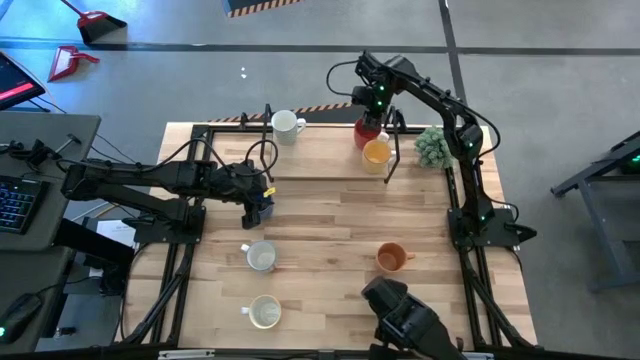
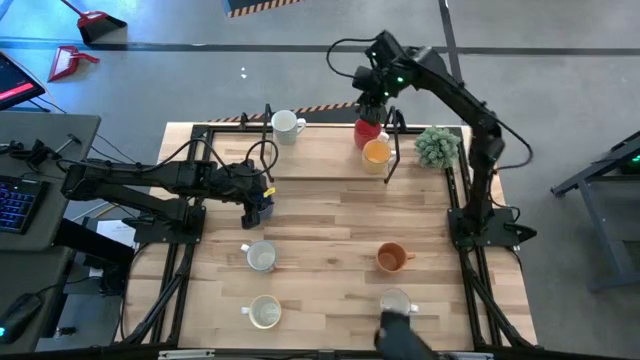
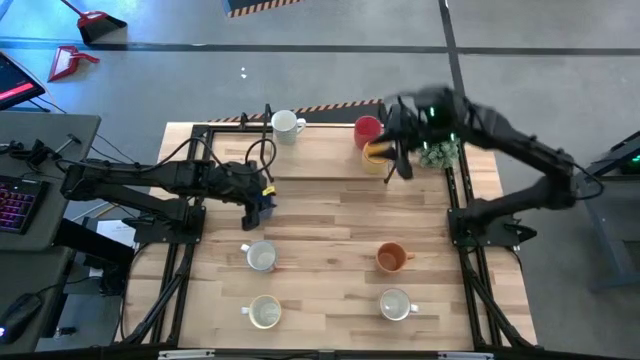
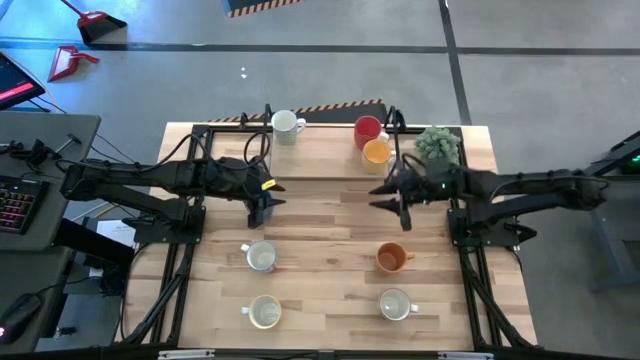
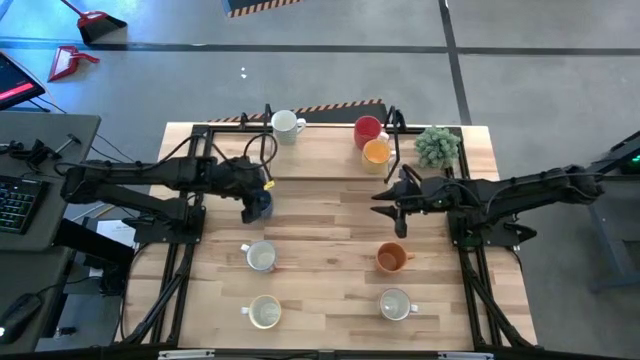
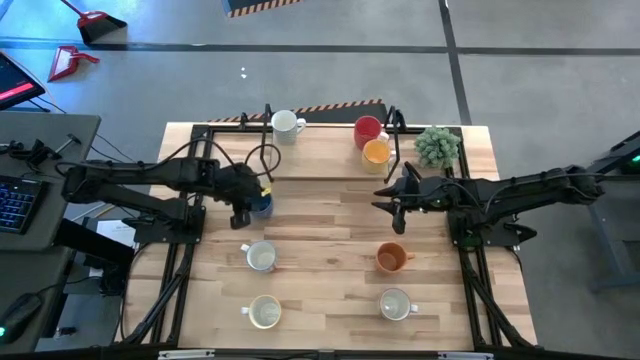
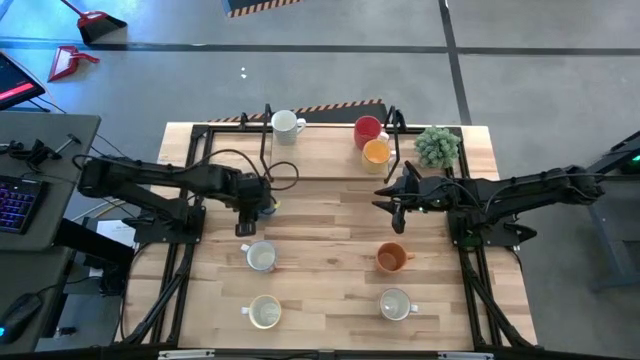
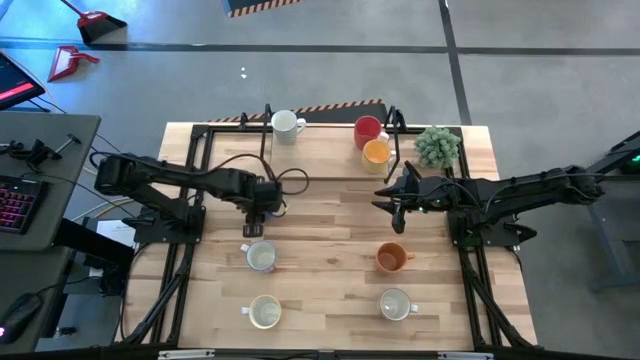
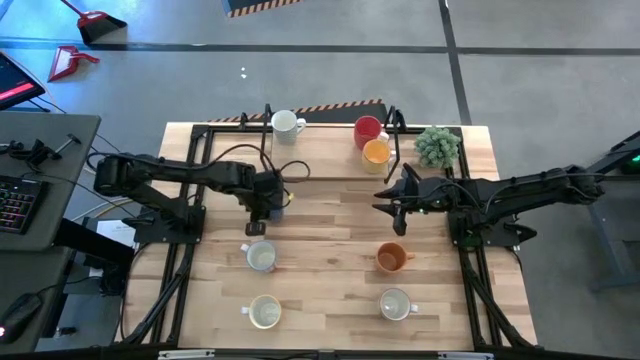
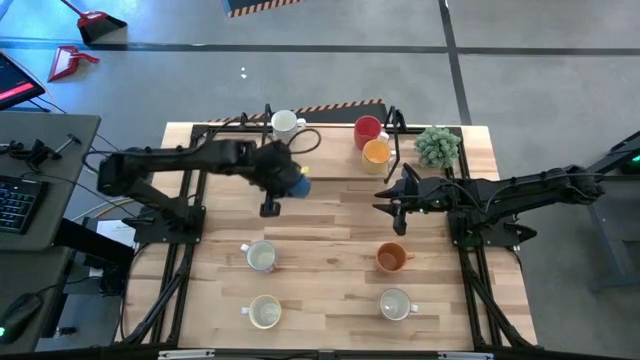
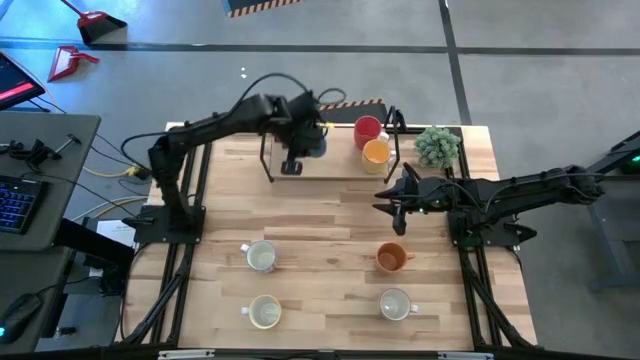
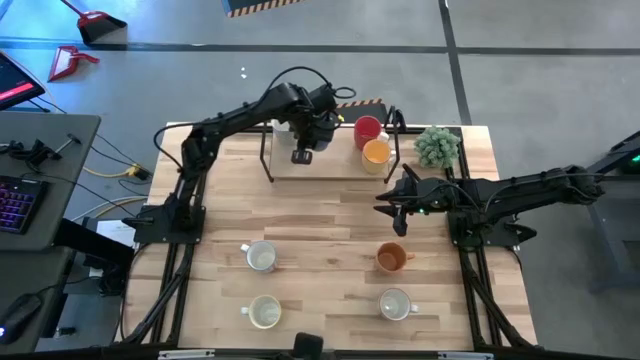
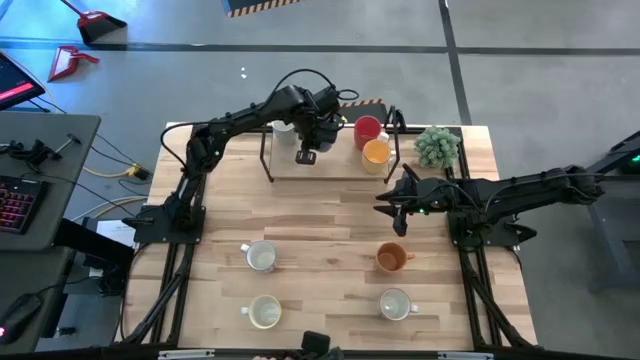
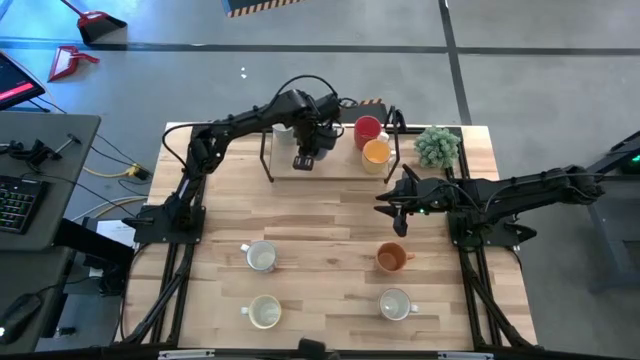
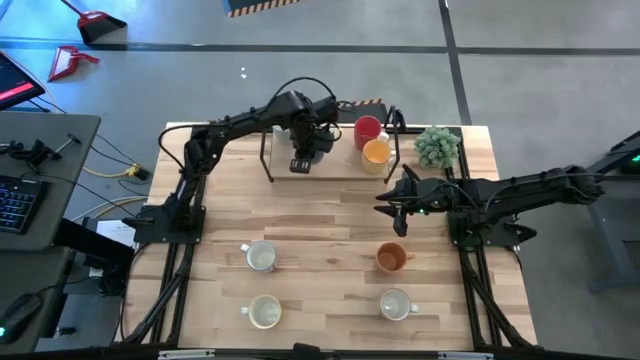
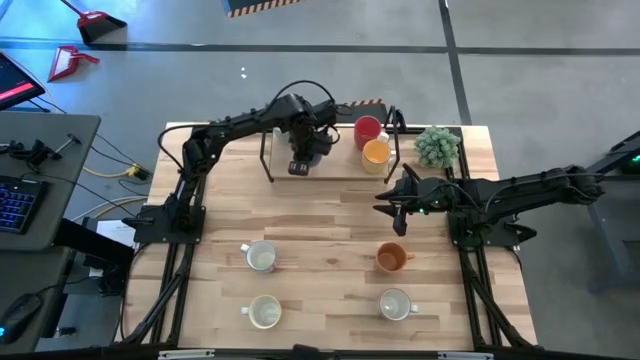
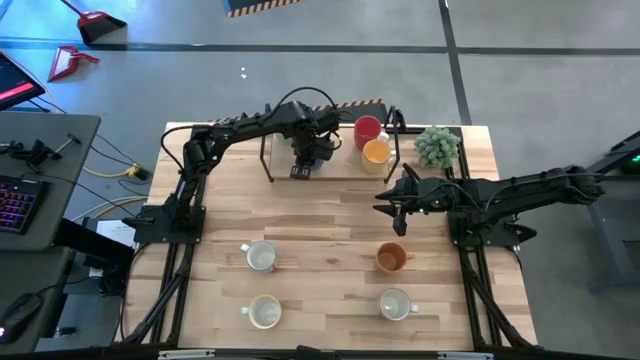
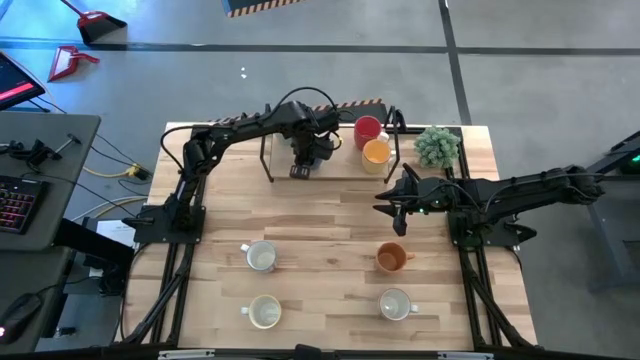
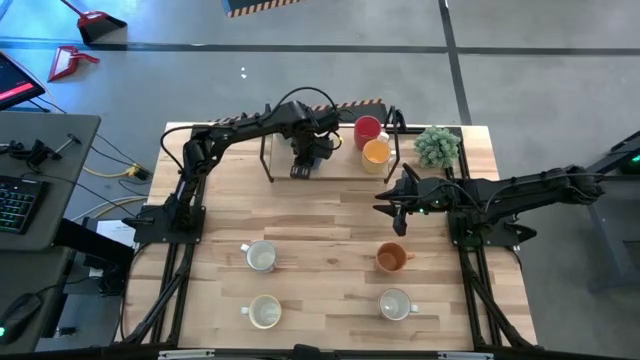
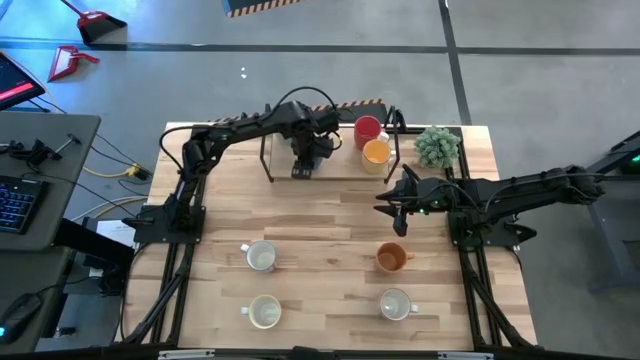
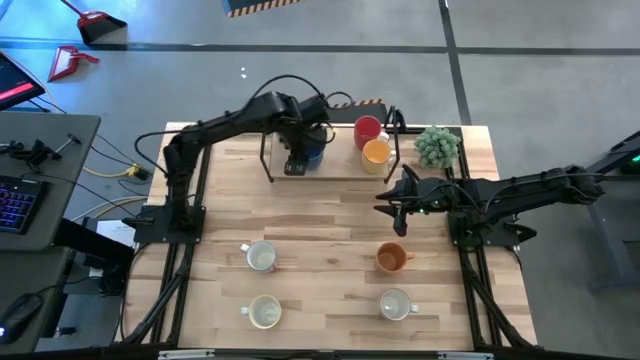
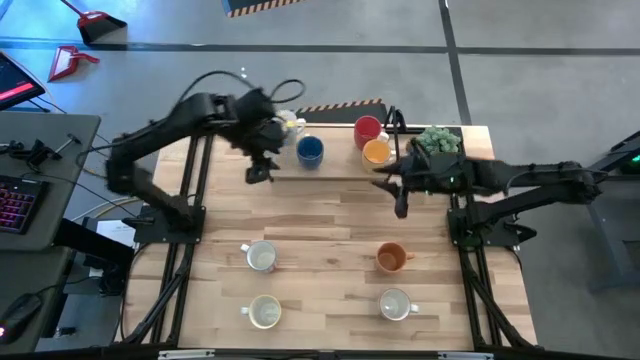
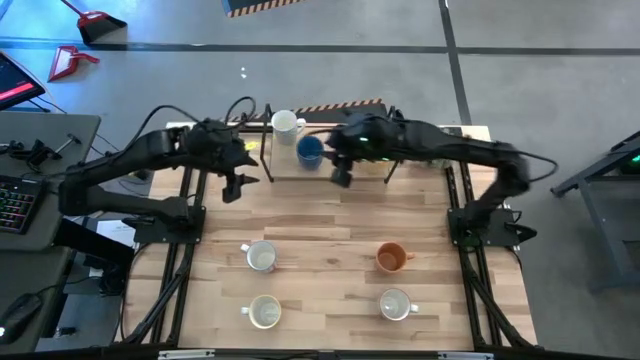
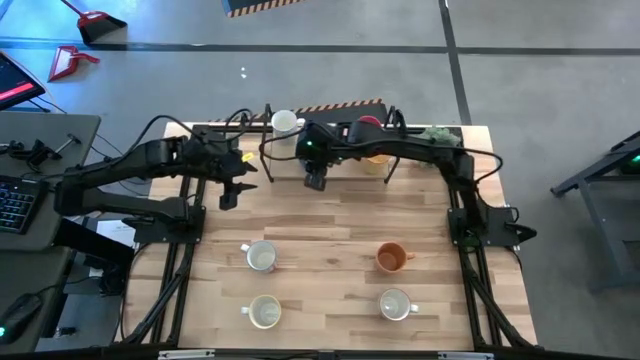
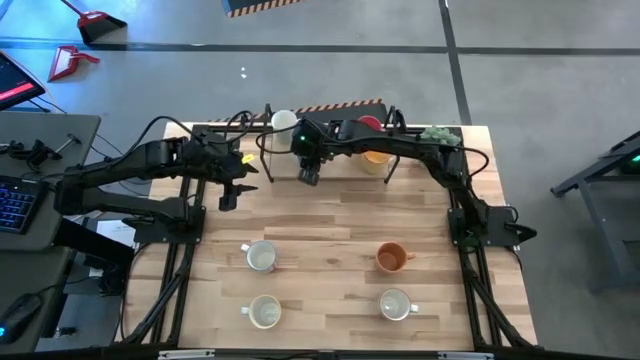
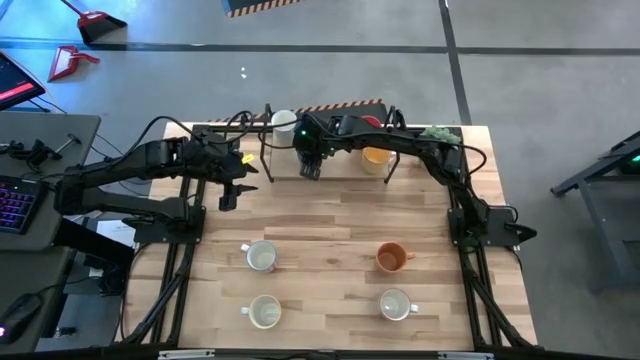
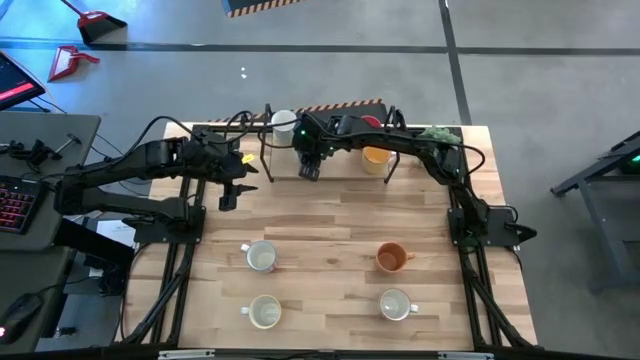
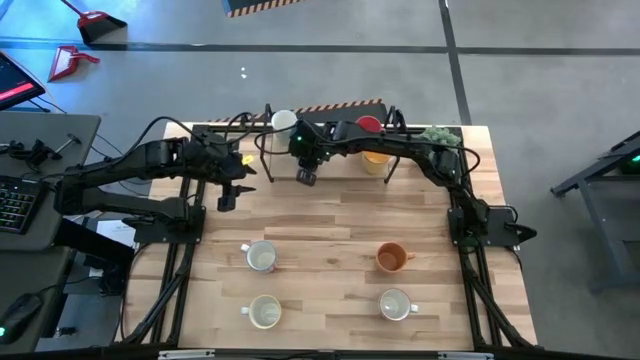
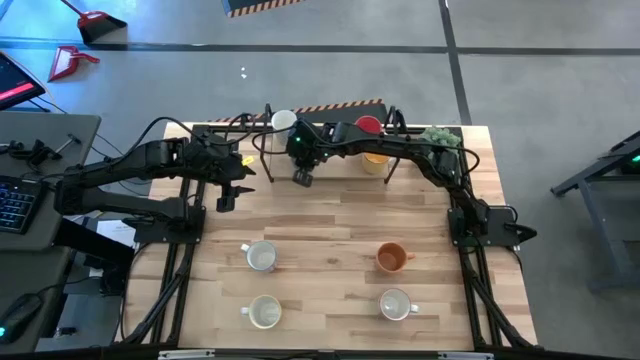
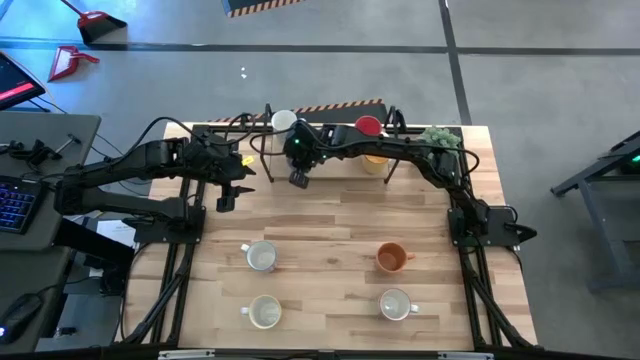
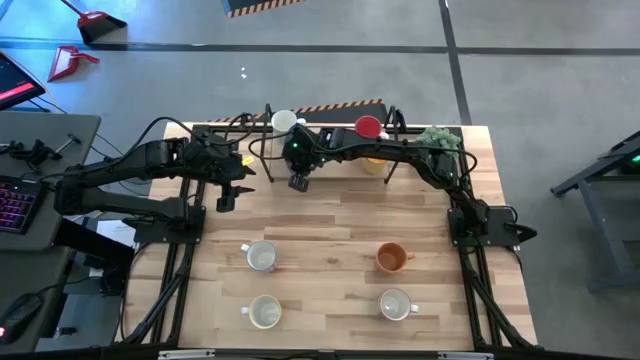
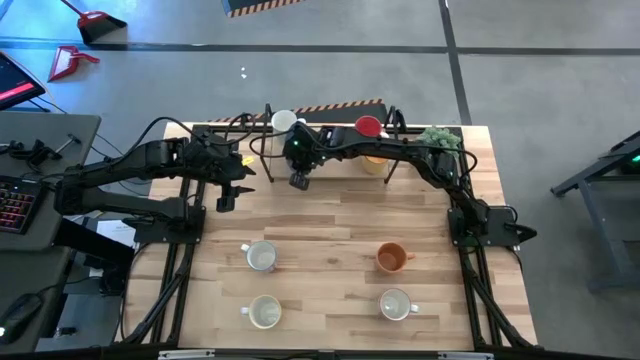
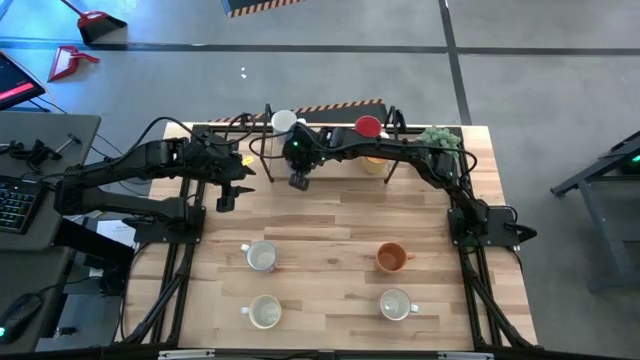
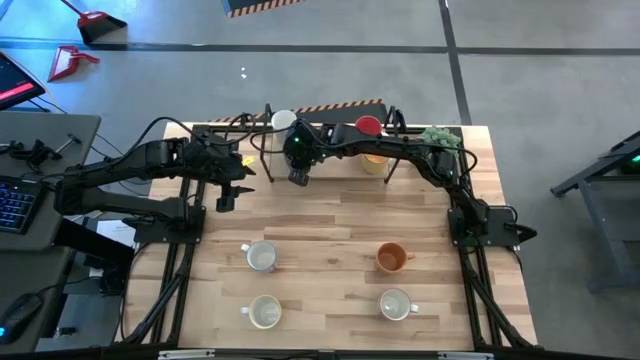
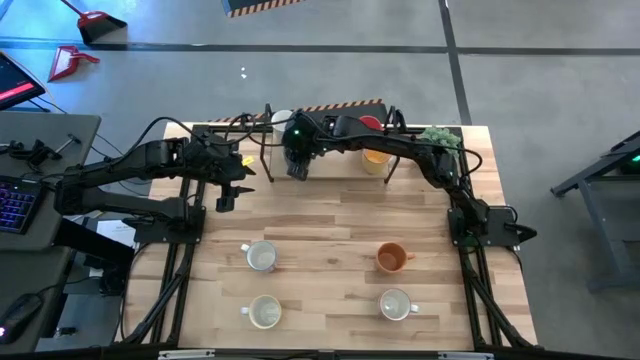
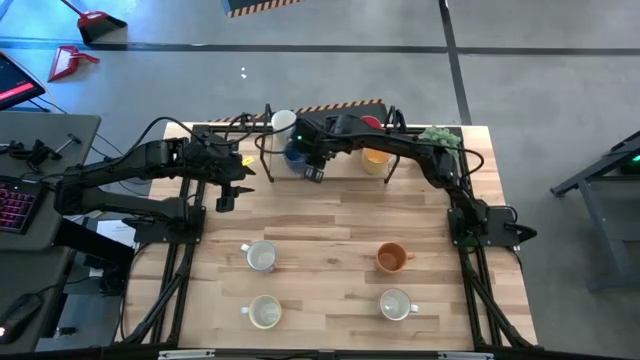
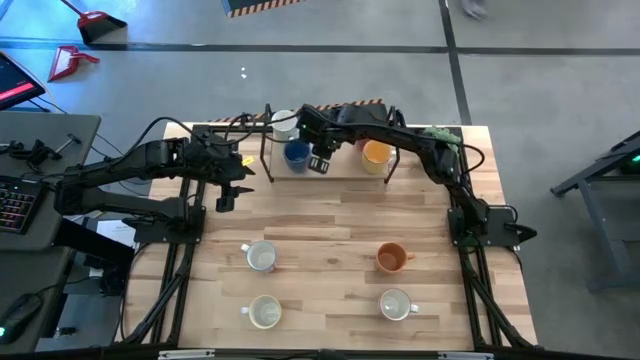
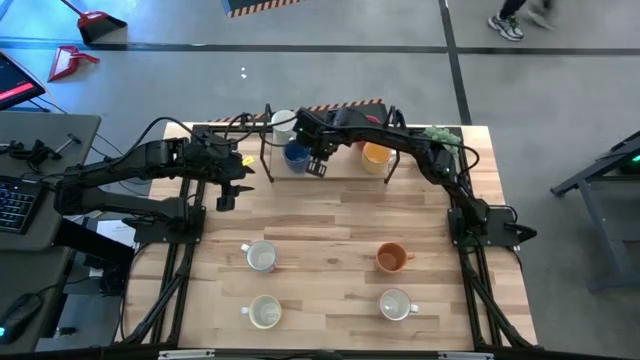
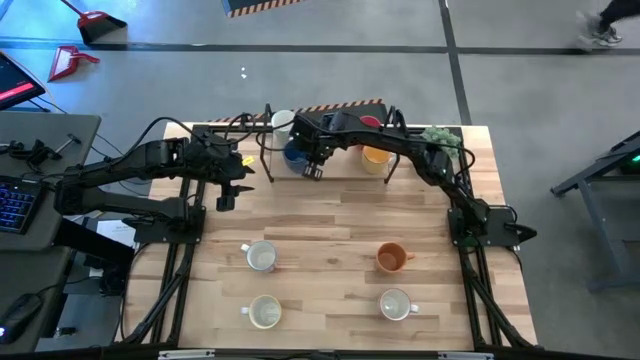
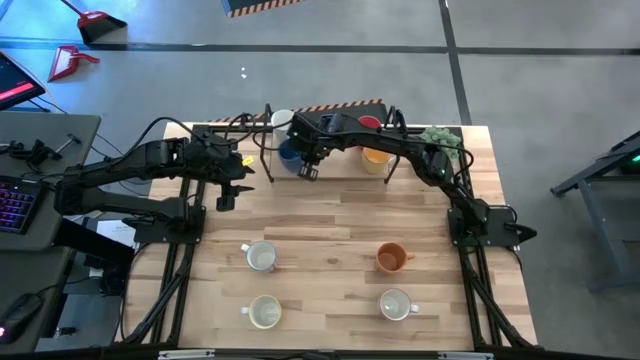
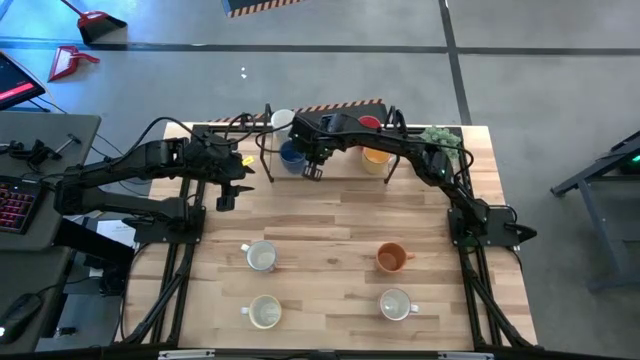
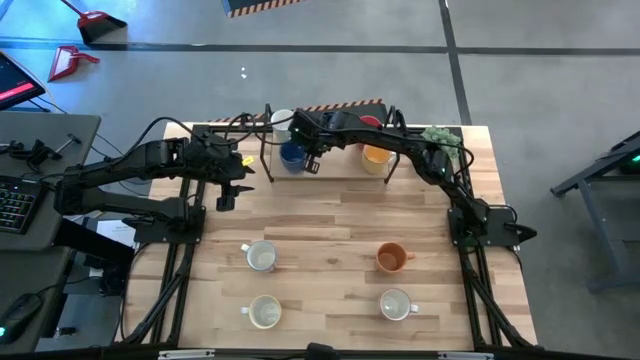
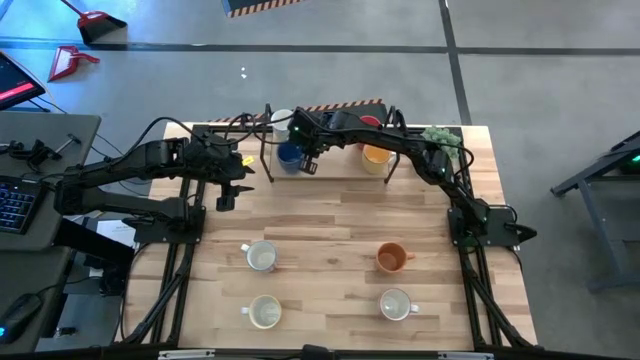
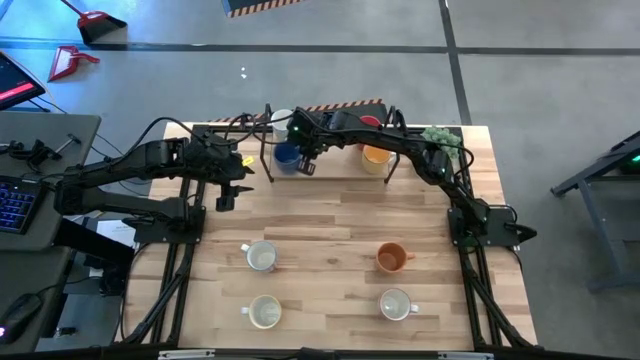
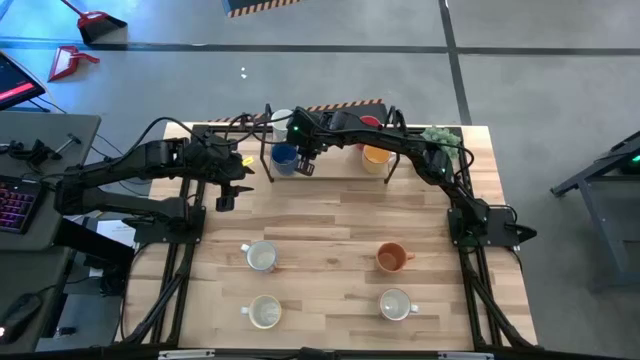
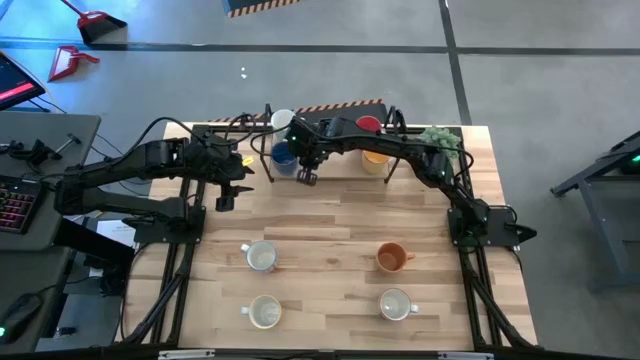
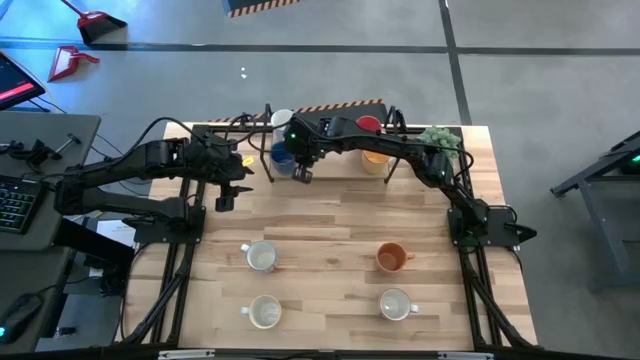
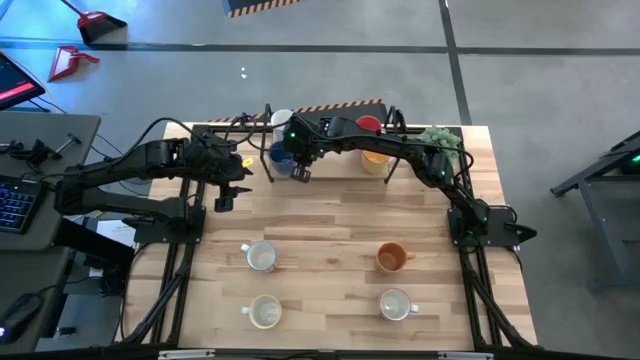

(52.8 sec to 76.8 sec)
Task: Place coffee mugs
Put the blue mug on the shelf
